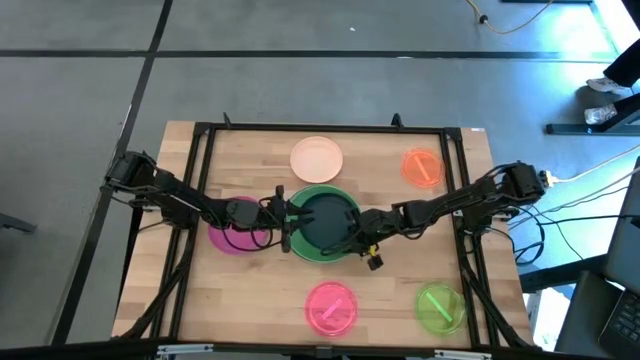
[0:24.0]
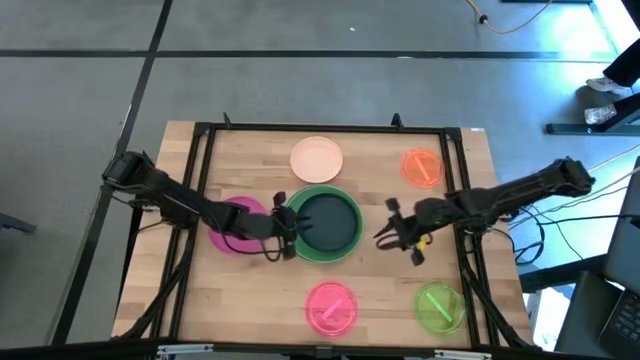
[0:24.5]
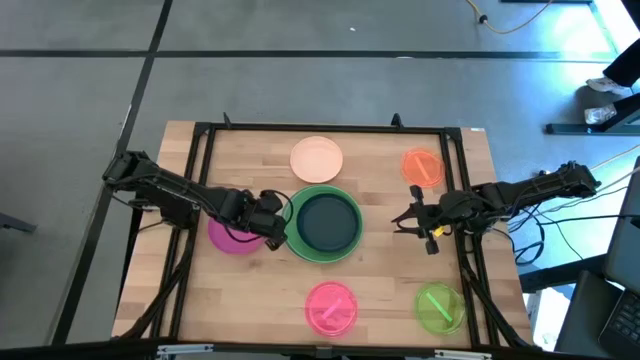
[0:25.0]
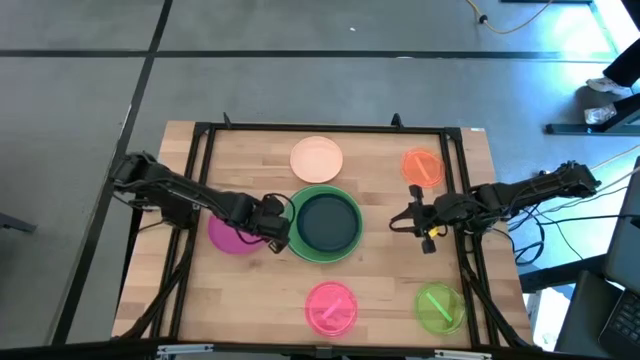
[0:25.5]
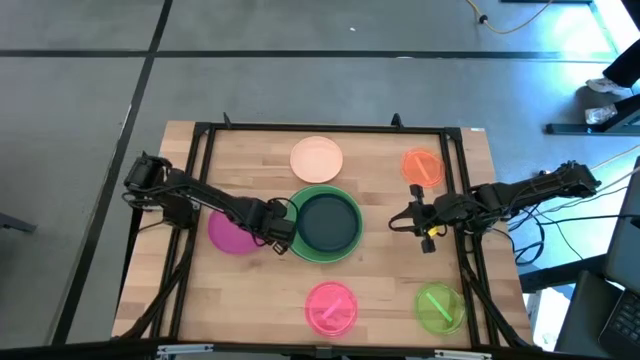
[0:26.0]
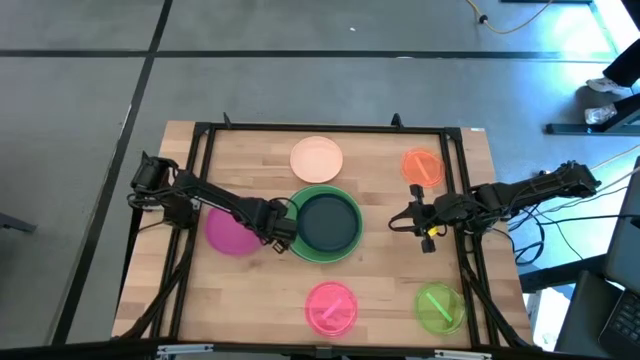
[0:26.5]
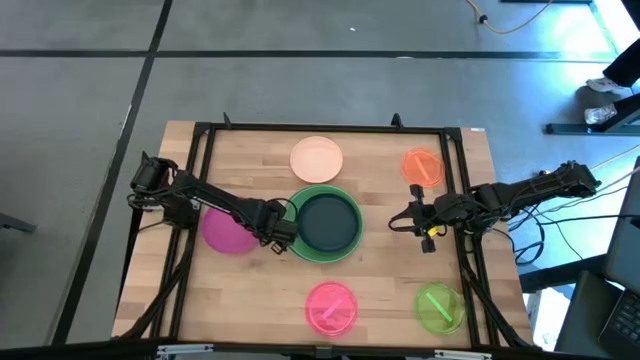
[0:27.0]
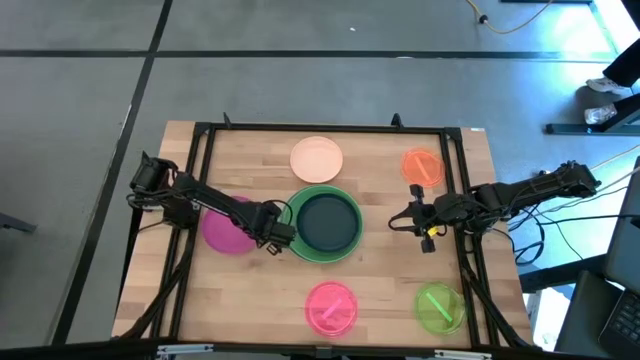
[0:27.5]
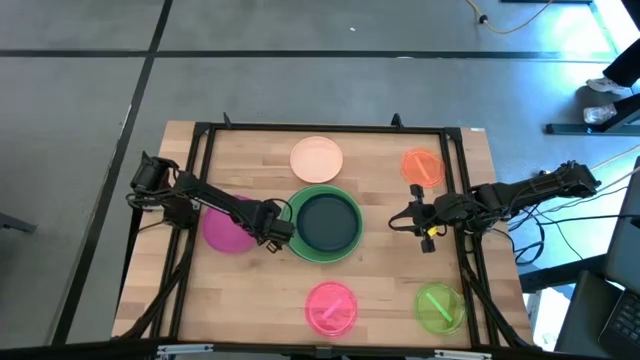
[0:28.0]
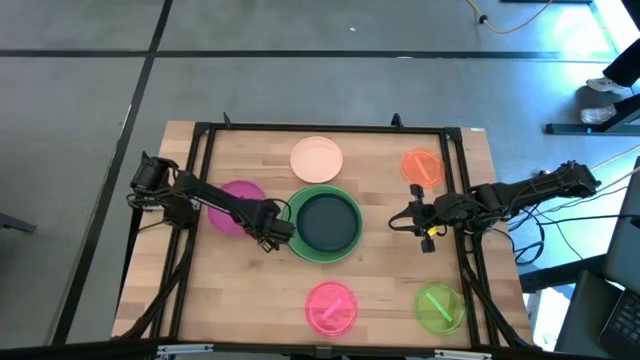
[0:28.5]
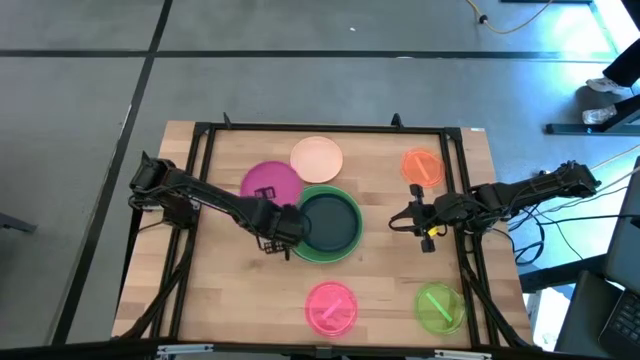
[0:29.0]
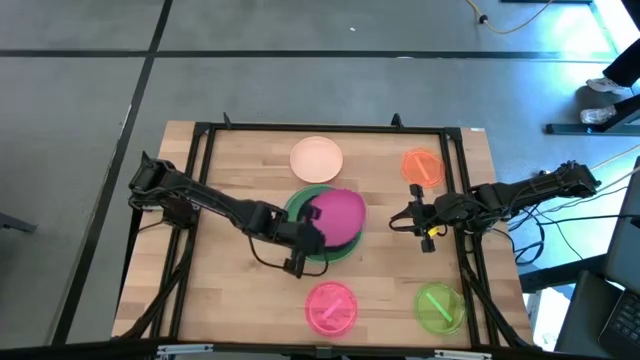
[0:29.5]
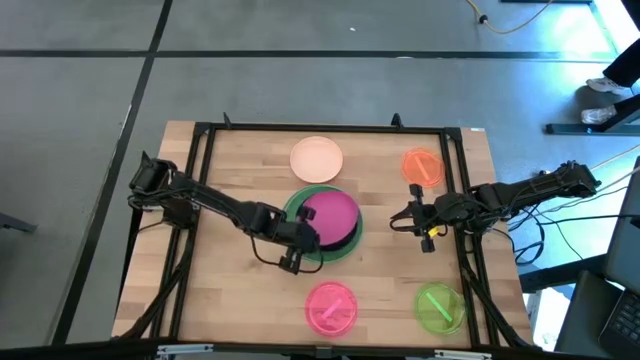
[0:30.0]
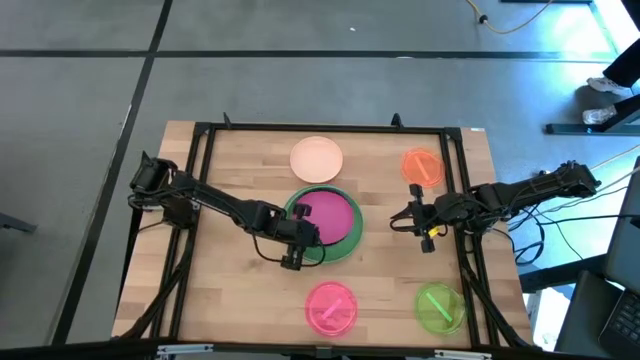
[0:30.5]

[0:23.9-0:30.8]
Task: Stack plastic plates
Stack the pink plate on top of the black plate

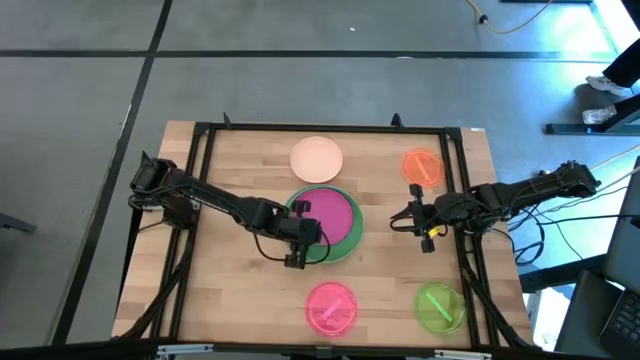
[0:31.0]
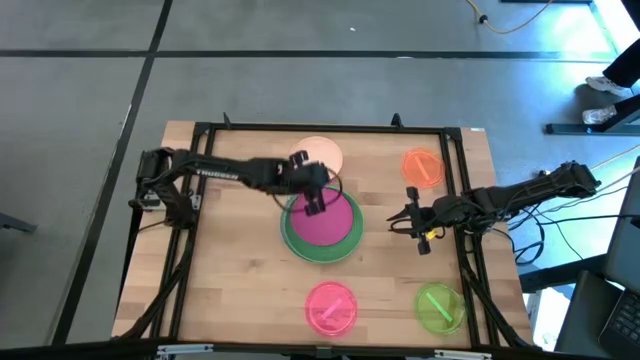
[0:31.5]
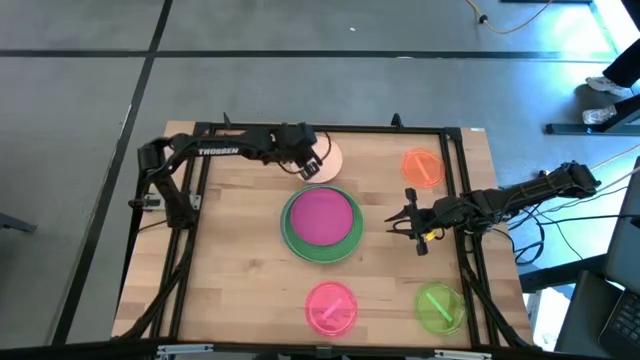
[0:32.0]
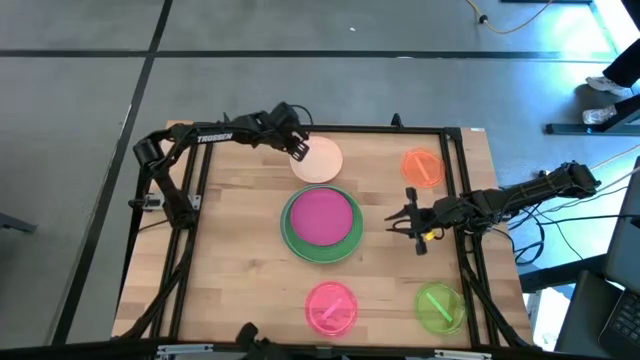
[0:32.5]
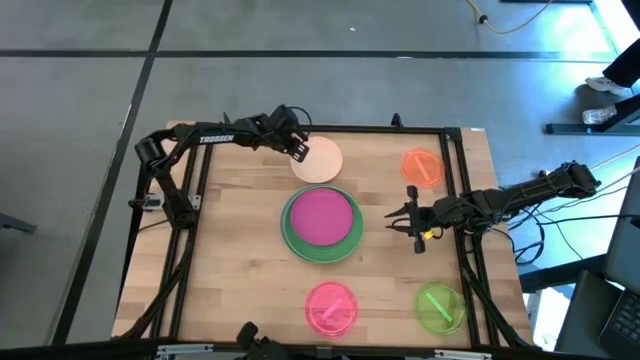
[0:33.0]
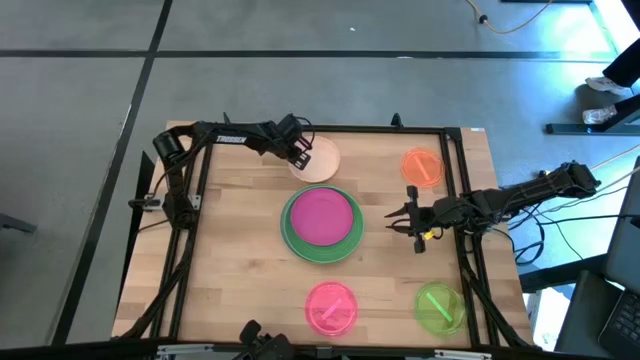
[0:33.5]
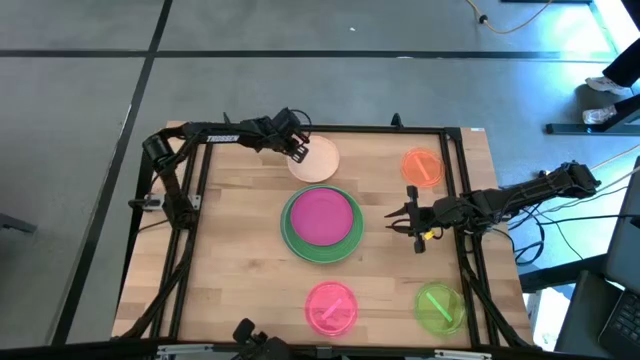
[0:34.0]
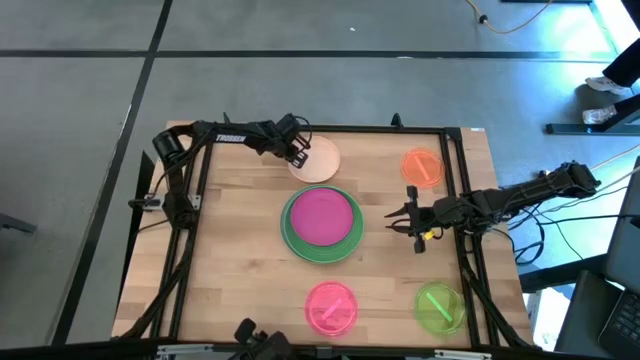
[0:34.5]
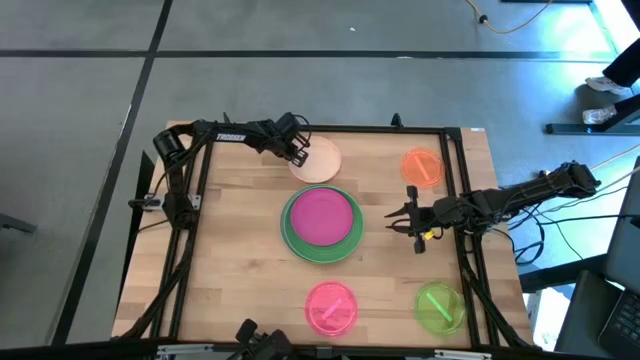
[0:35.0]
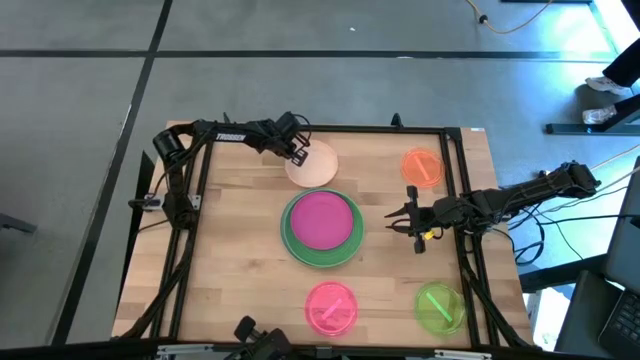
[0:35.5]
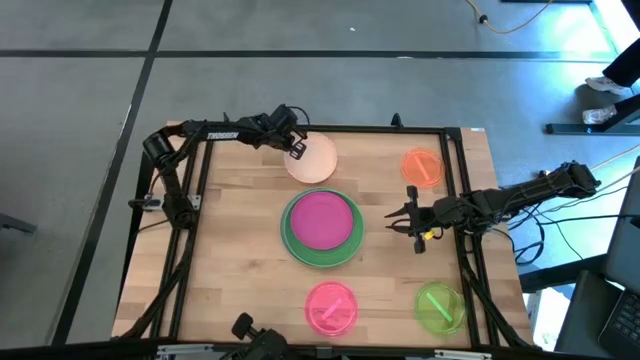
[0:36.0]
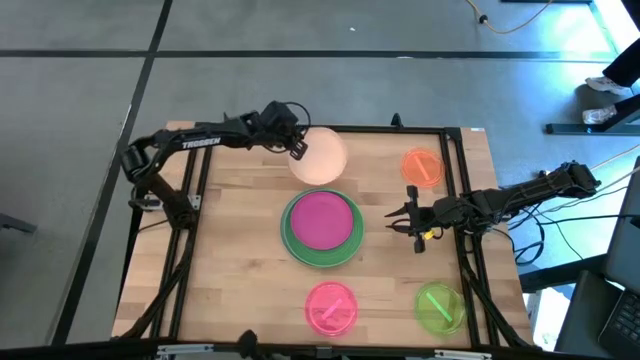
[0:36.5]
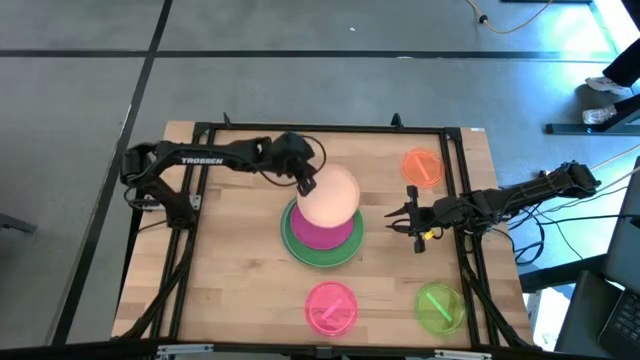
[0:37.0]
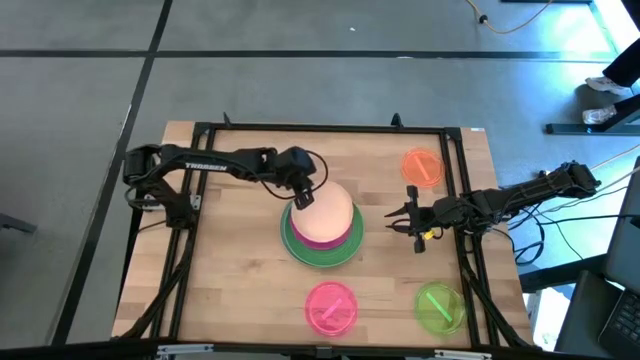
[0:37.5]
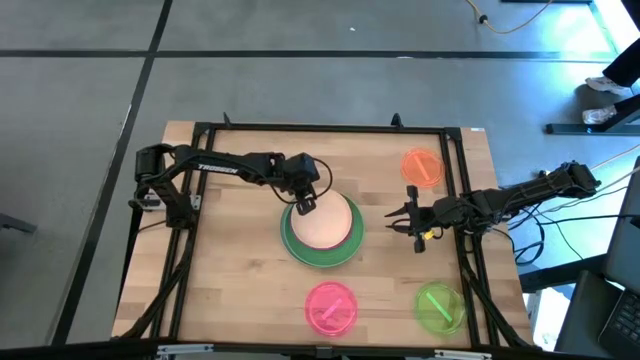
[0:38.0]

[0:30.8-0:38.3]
Stack the white plate on top of the pink plate

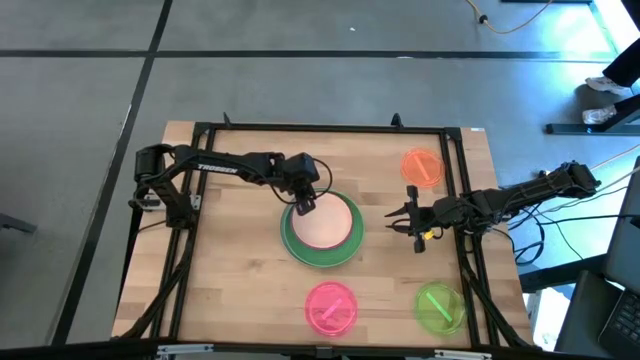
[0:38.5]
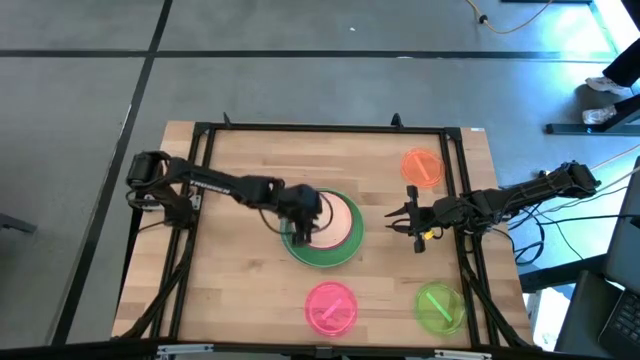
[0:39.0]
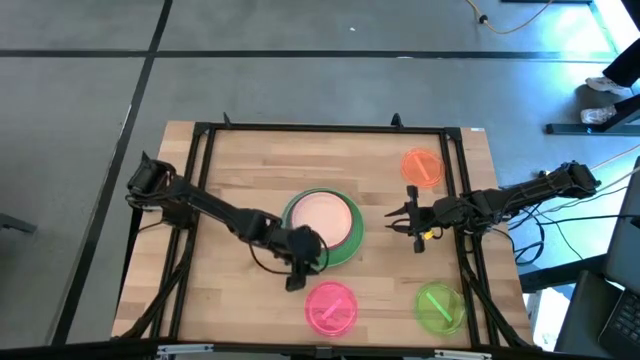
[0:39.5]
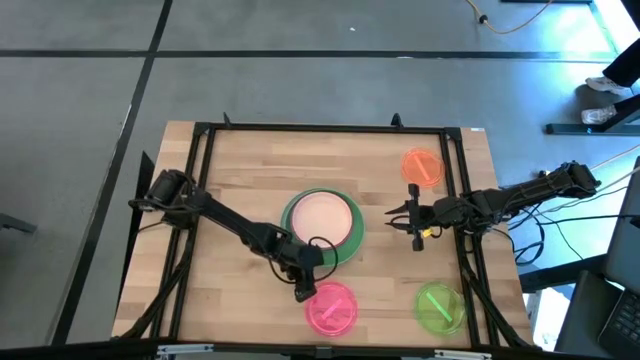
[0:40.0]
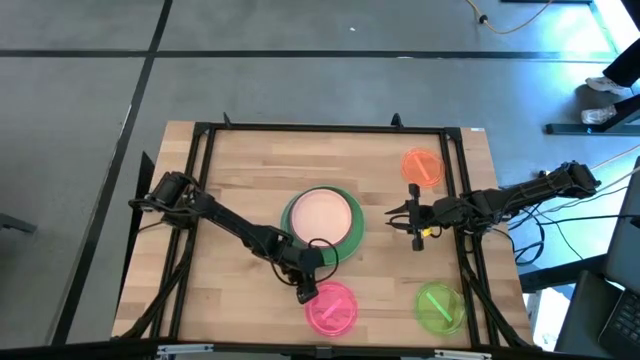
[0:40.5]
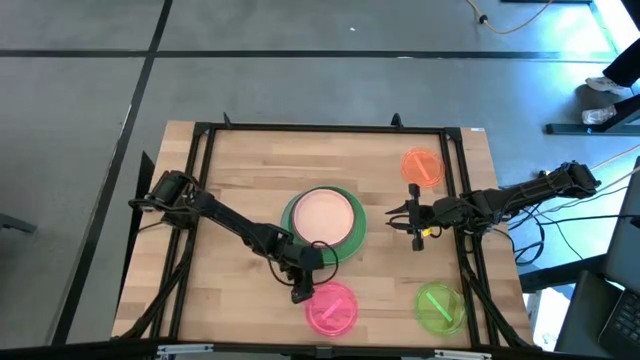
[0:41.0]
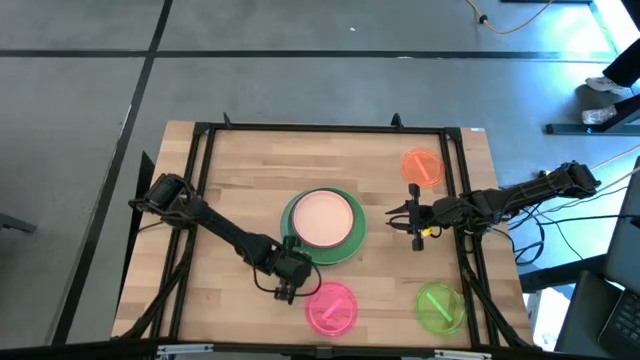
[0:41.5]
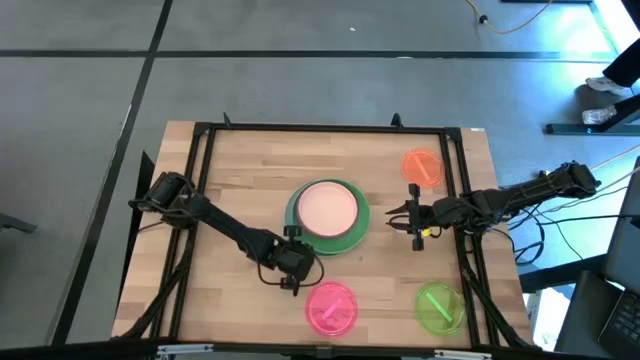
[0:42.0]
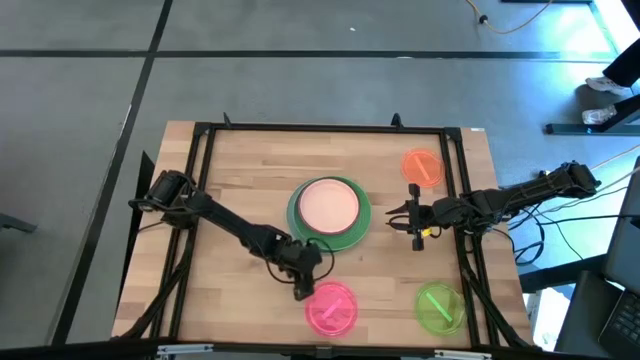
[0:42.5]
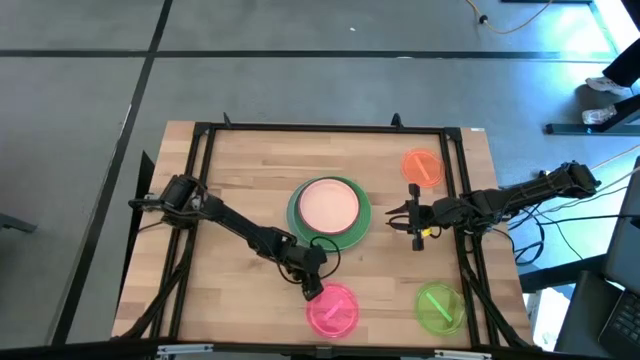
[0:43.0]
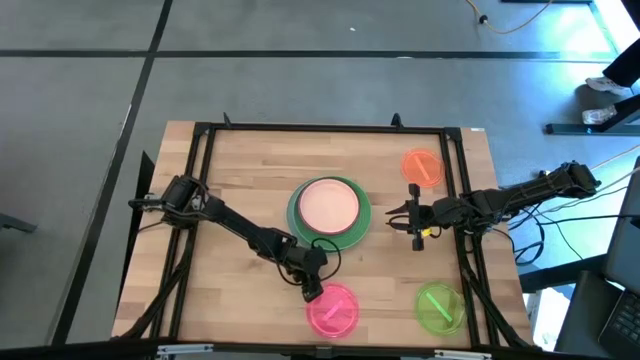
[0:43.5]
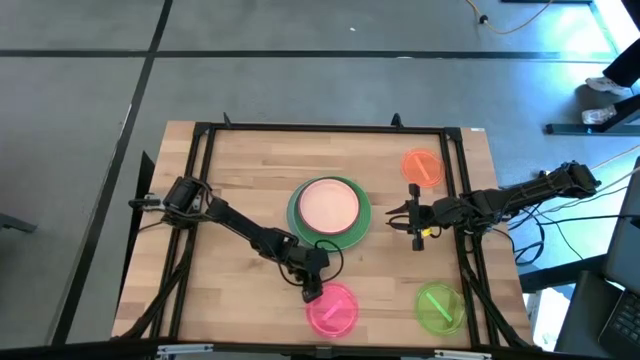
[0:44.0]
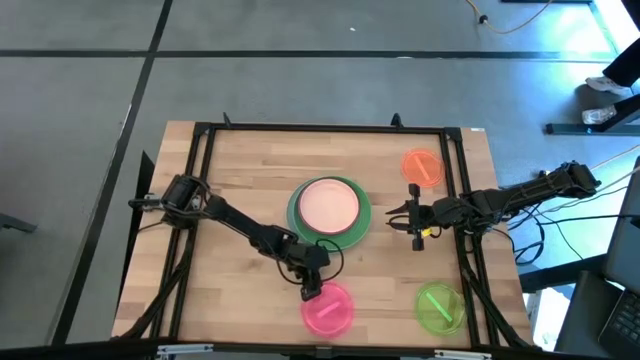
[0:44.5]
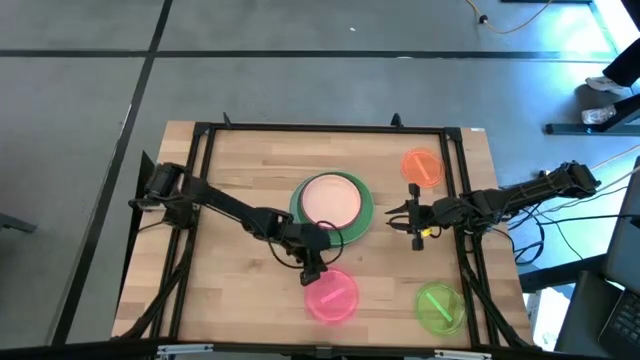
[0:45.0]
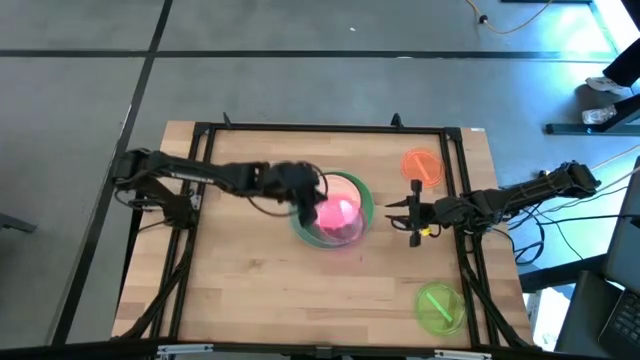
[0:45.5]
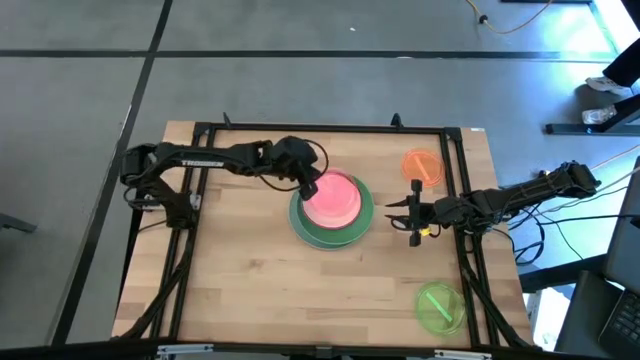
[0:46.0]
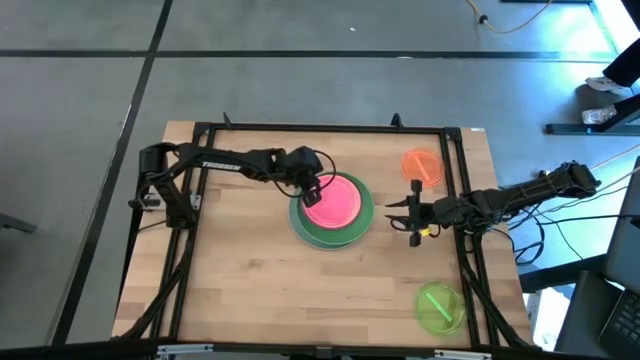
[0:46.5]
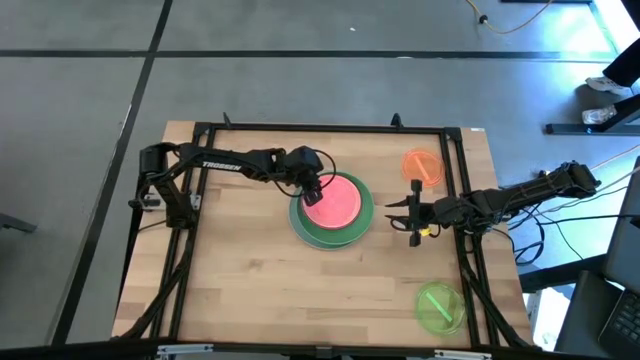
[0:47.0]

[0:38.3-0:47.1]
Stack the light pink plate on top of the light orange plate
